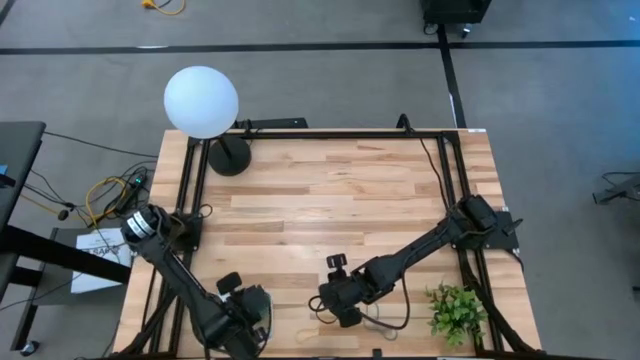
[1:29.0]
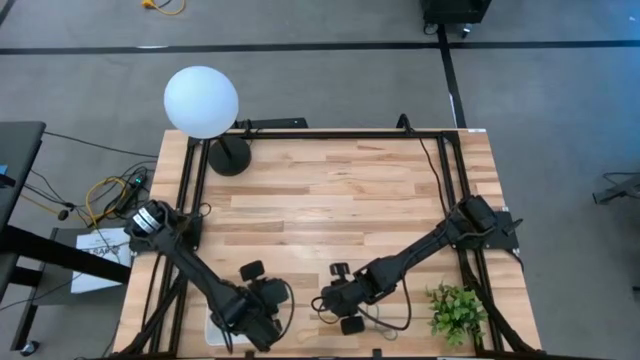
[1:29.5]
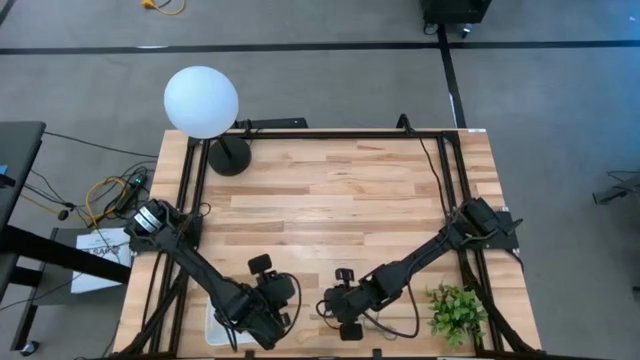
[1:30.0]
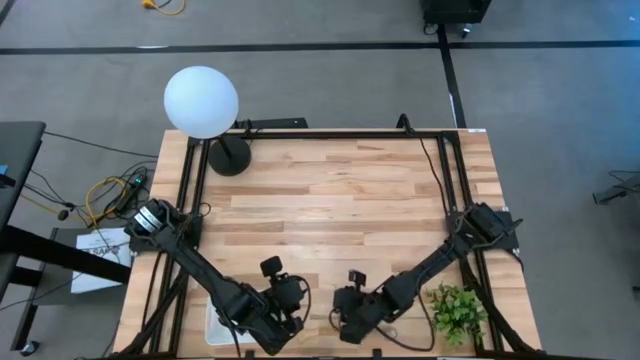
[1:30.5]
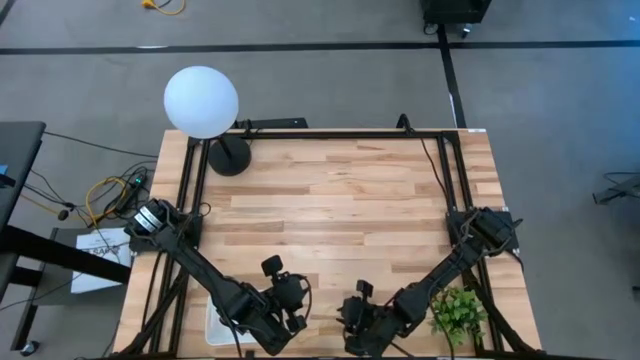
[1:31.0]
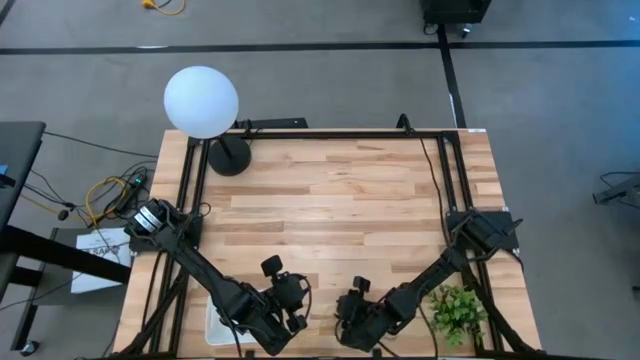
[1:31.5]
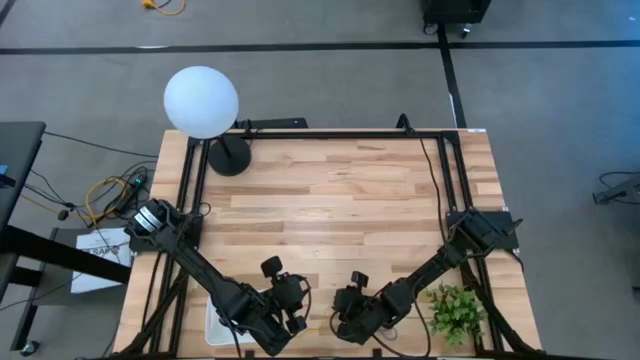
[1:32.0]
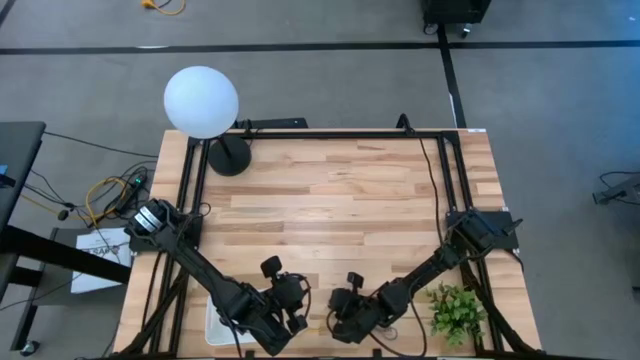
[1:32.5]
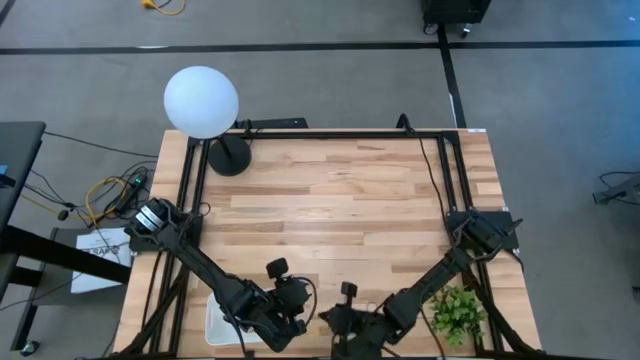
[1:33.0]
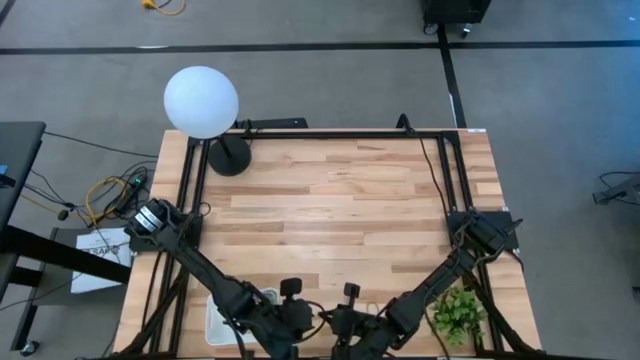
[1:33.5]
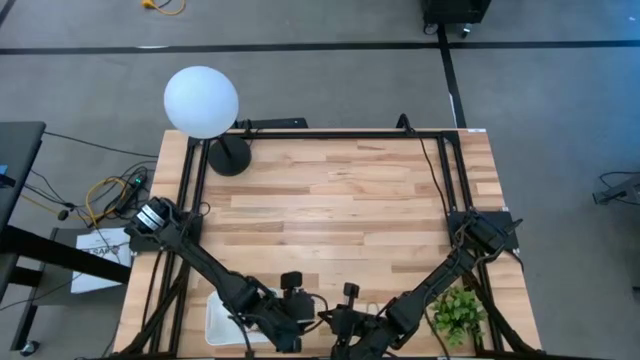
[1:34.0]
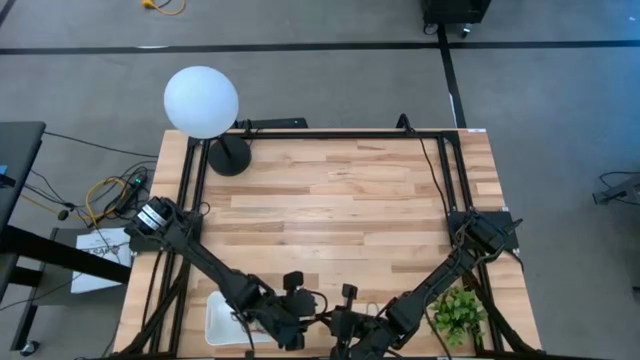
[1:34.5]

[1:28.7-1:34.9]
Task: Pick and place items into bin
Put the yellow rubber band into the bin

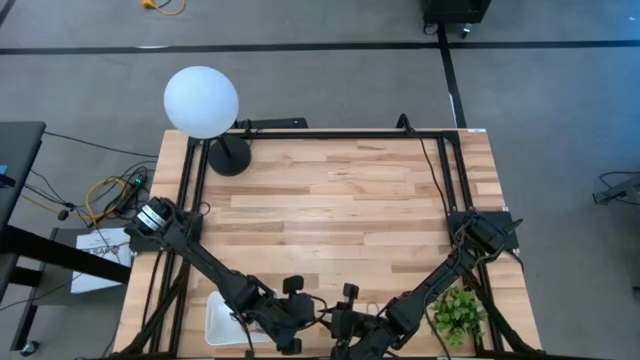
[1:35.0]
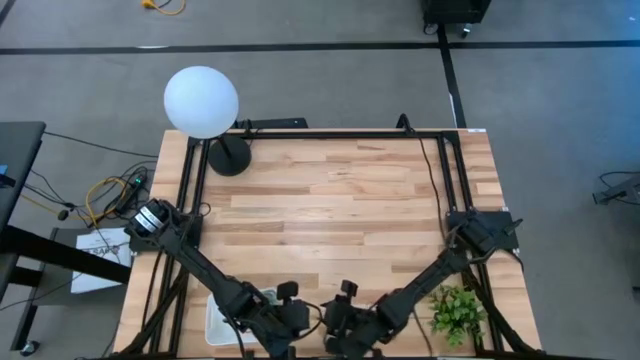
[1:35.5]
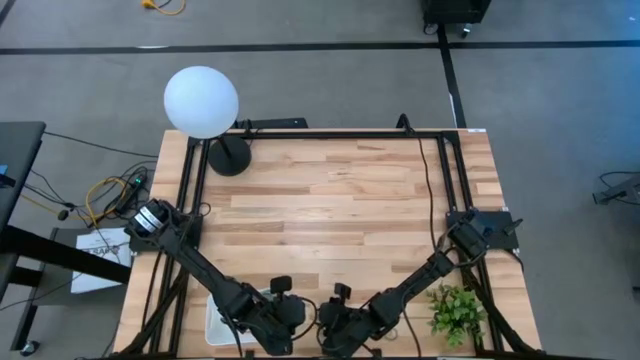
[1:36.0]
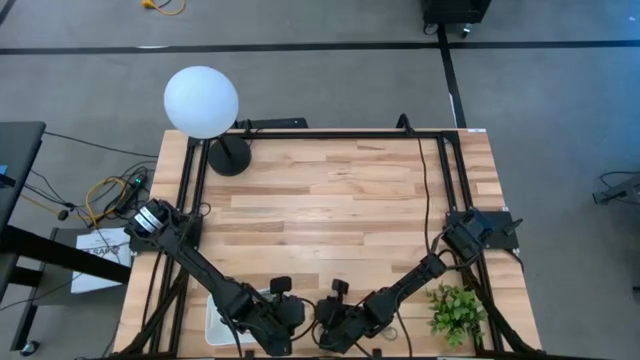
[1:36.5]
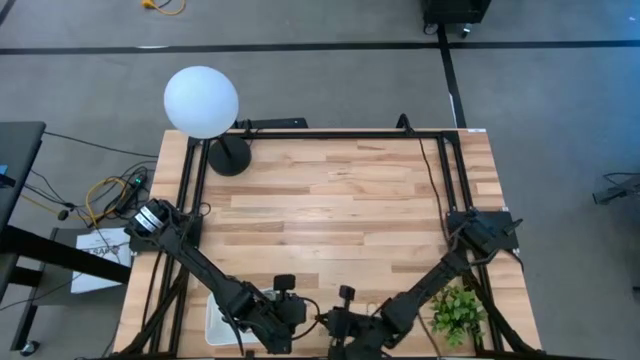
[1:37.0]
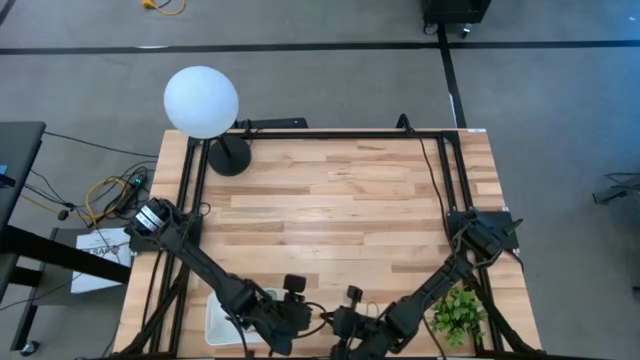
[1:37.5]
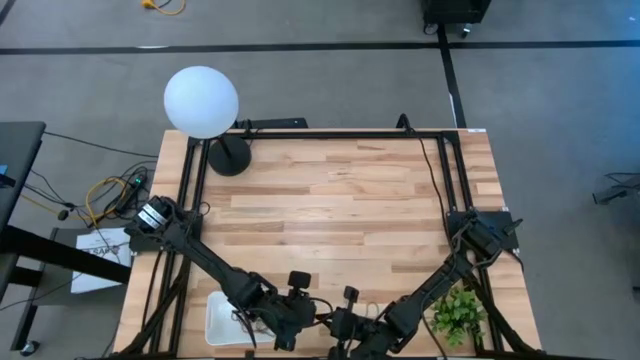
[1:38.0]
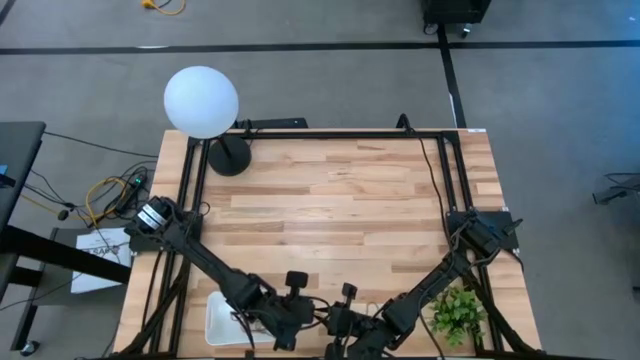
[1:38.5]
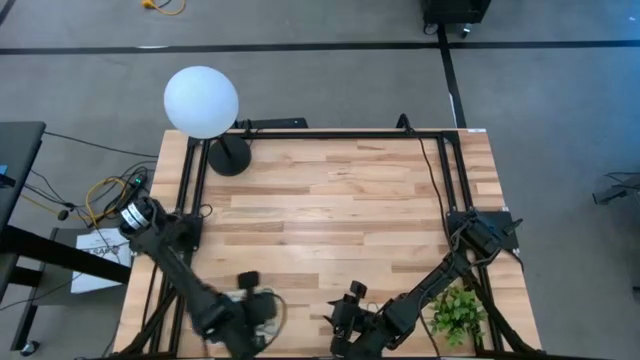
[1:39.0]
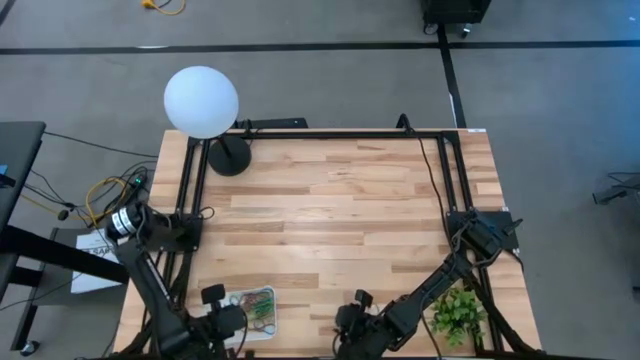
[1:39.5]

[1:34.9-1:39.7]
Put the yellow rubber band into the bin

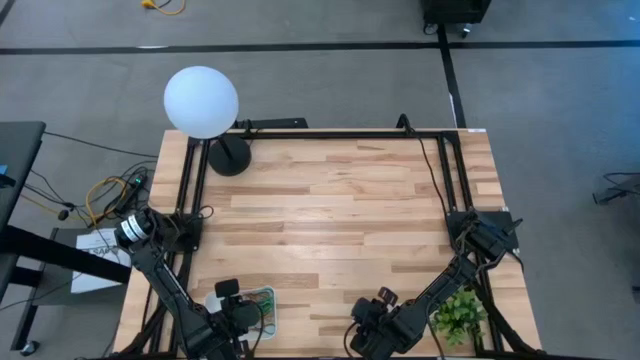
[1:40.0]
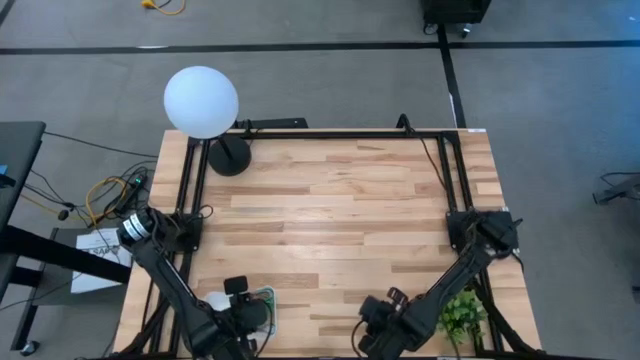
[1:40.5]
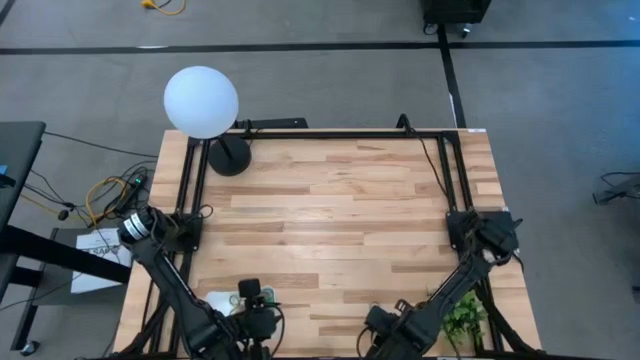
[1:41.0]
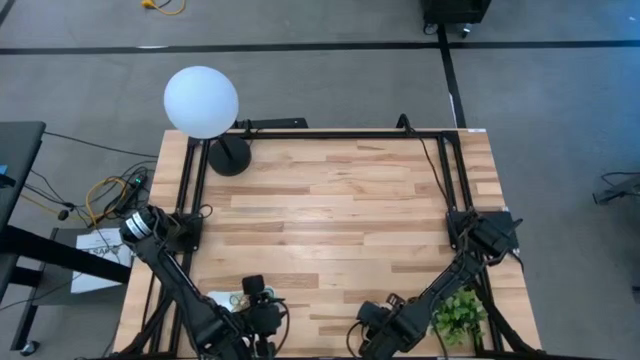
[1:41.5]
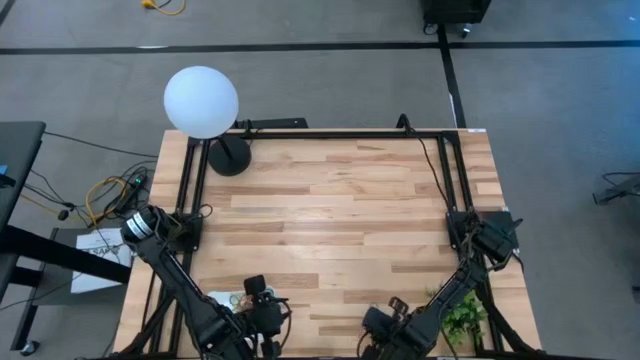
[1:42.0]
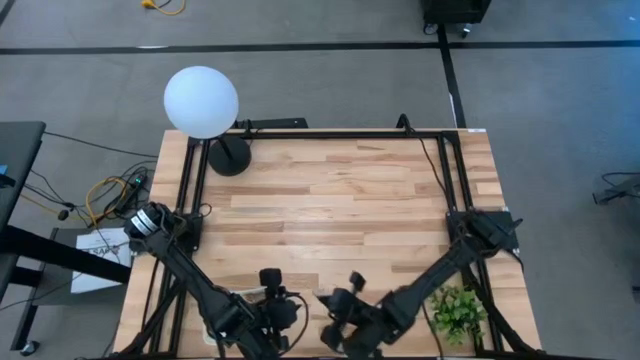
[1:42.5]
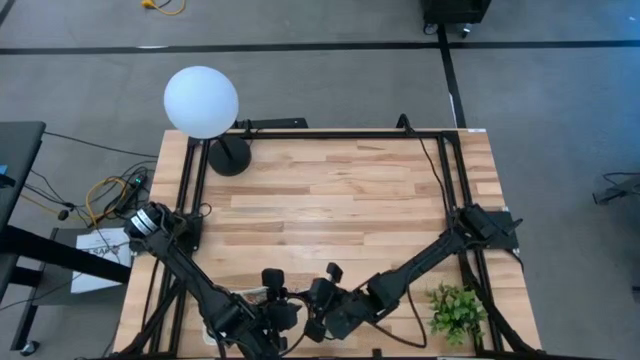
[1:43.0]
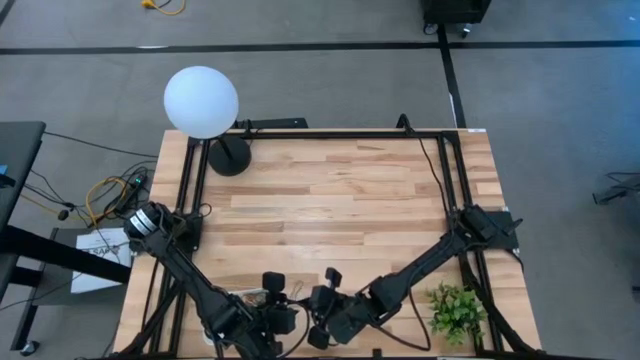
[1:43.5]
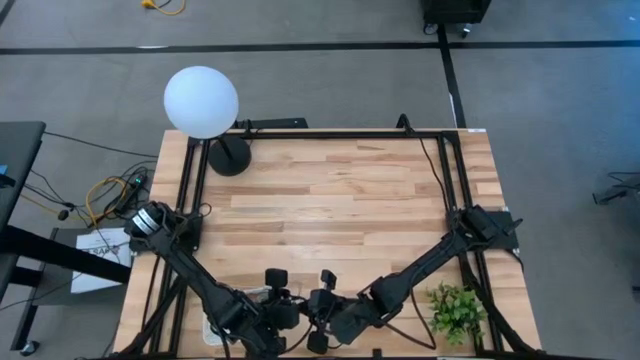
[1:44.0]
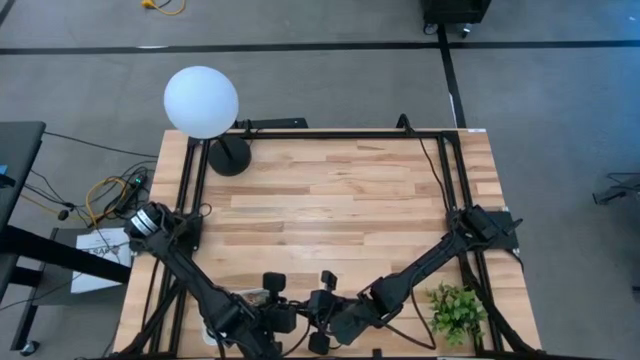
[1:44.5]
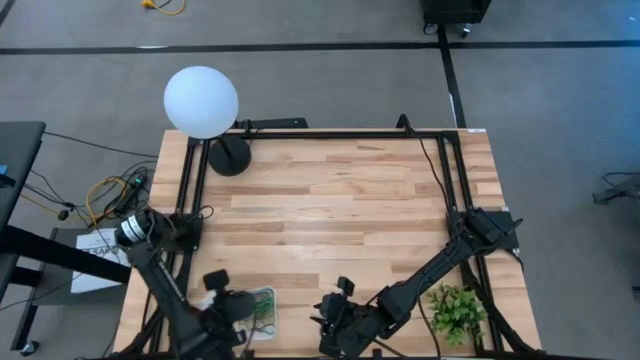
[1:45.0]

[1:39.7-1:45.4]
Put the blue rubber band into the bin

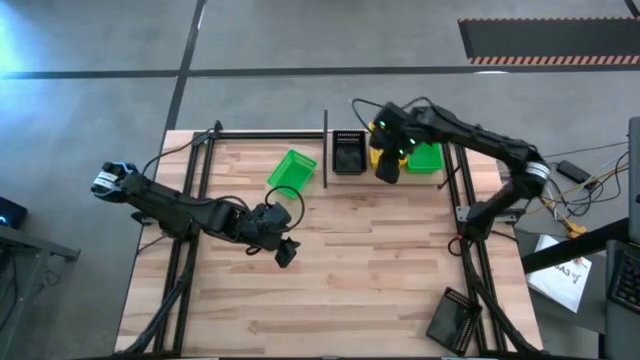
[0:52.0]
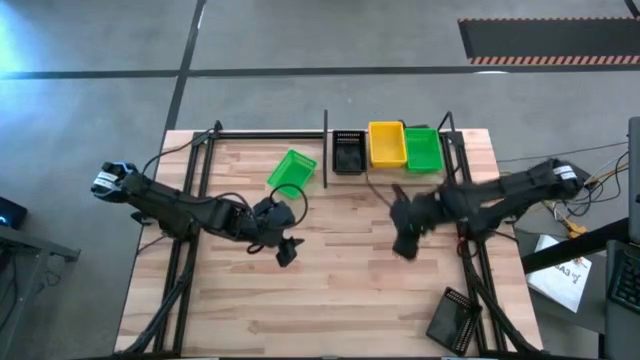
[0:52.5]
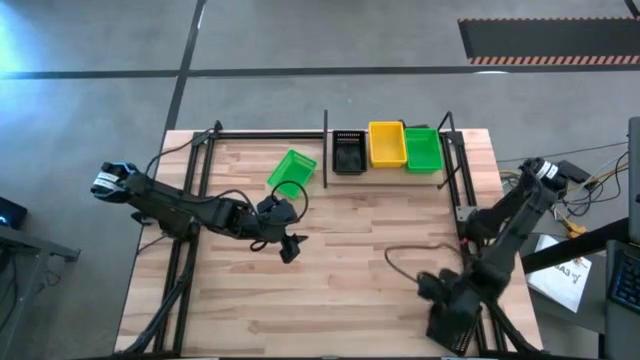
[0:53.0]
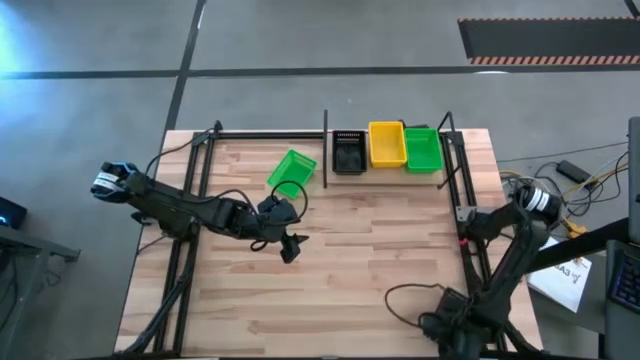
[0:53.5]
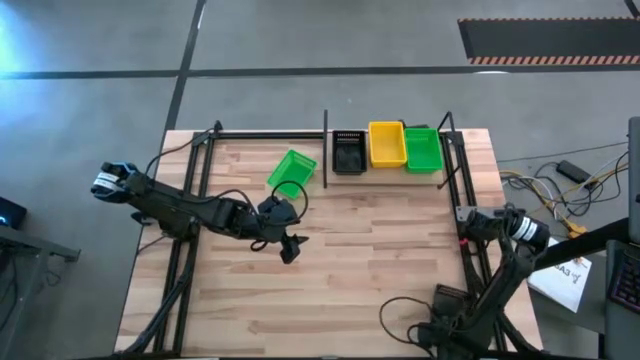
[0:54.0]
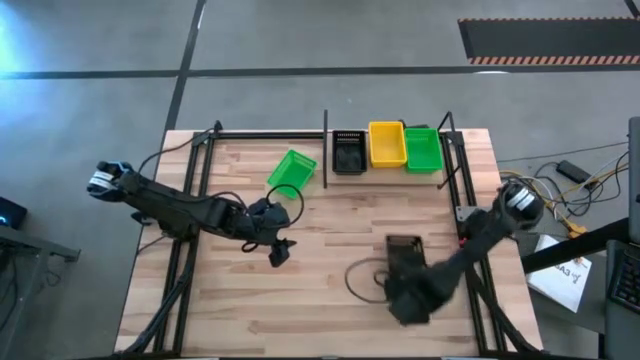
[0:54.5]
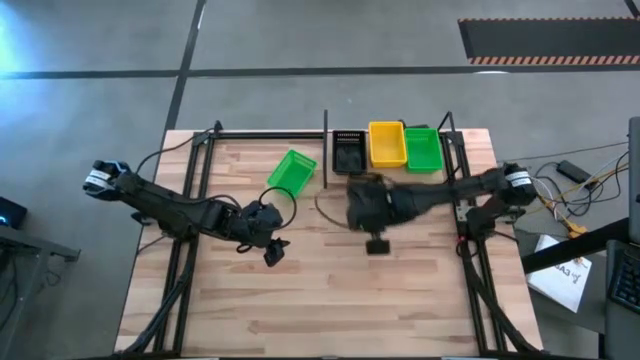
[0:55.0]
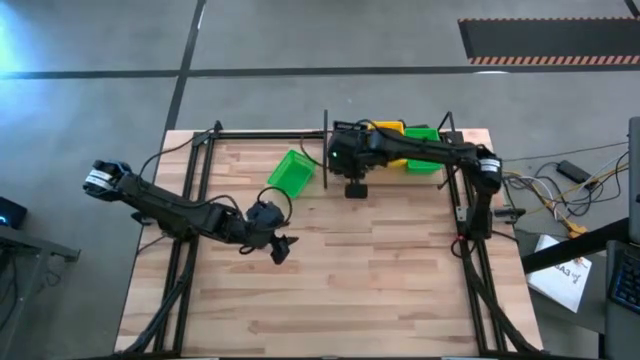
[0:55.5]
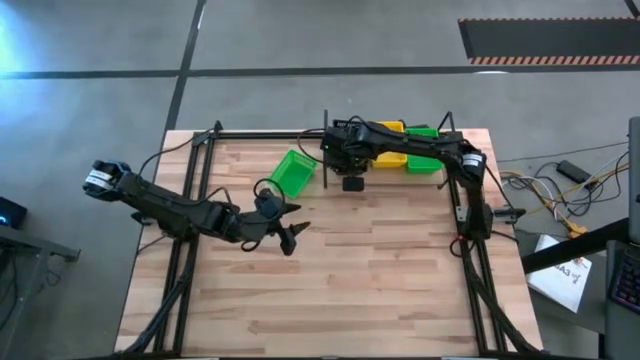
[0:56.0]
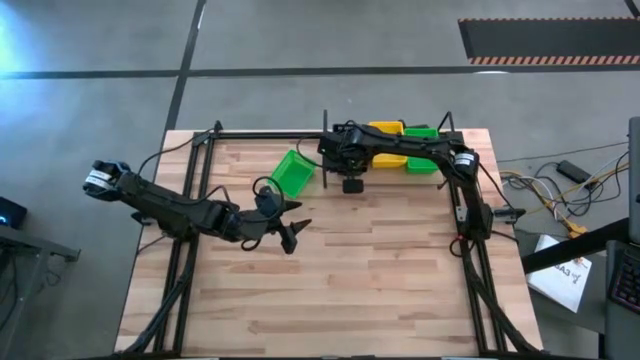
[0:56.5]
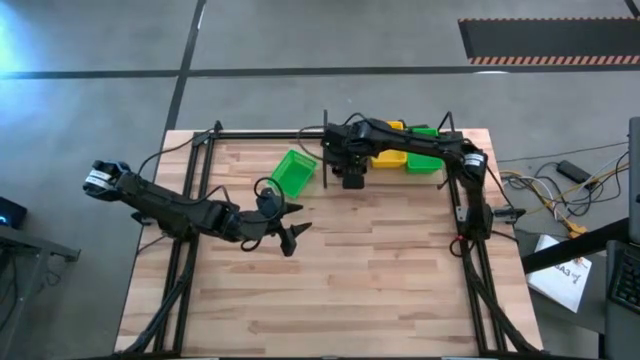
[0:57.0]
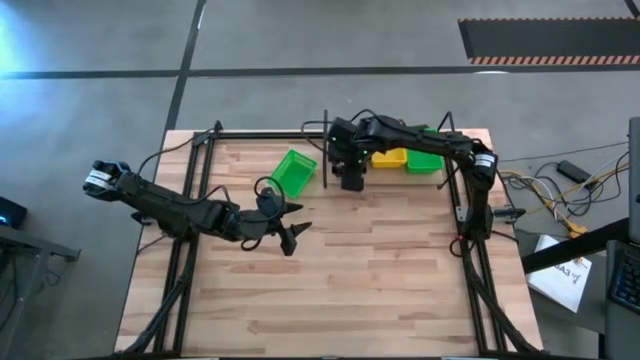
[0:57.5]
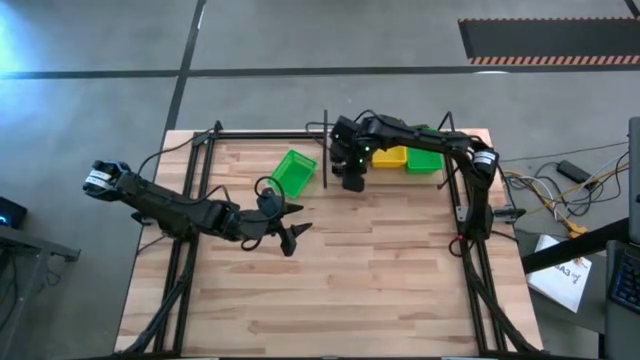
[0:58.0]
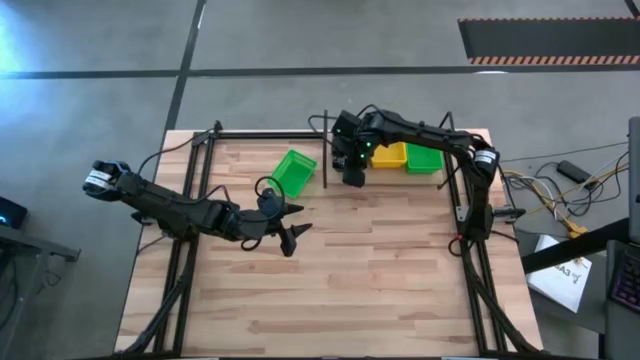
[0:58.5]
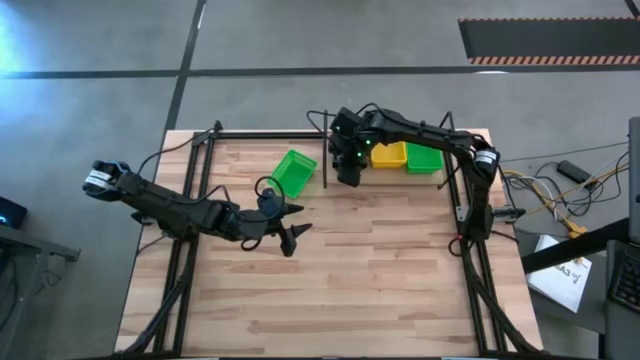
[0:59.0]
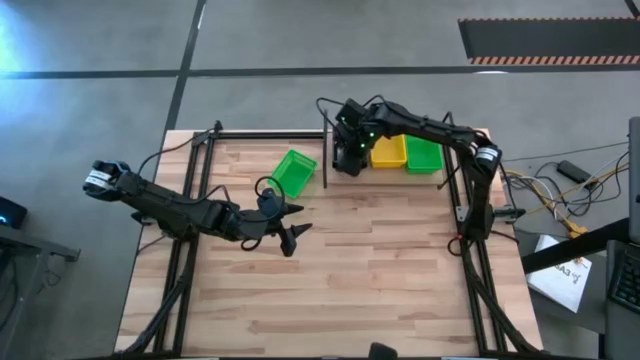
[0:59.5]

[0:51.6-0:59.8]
Task: Stack baskets on shelf by color
Stack the black bin on top of the black bins on the shelf
